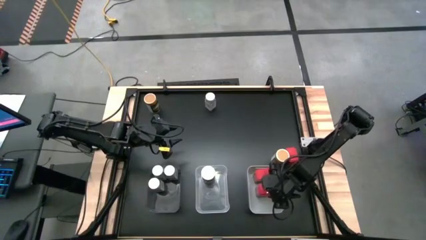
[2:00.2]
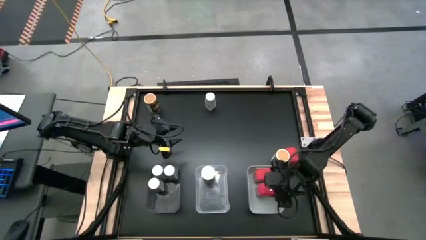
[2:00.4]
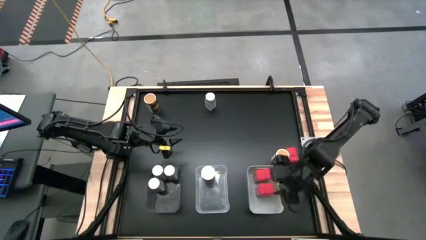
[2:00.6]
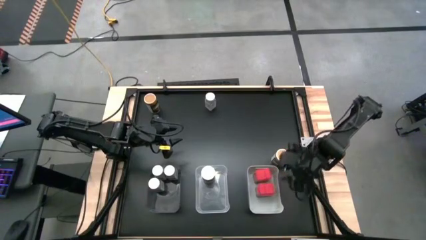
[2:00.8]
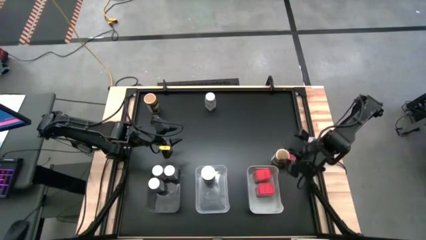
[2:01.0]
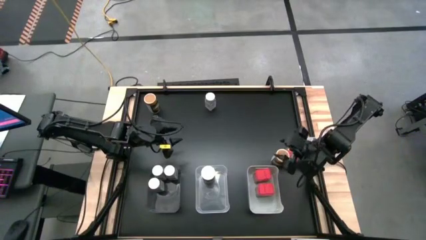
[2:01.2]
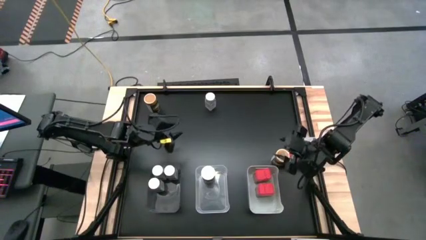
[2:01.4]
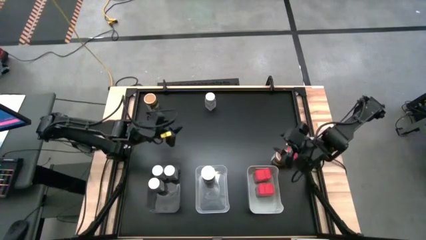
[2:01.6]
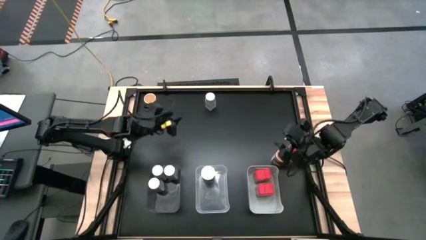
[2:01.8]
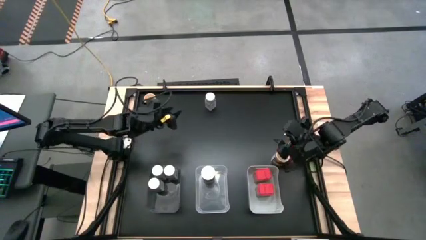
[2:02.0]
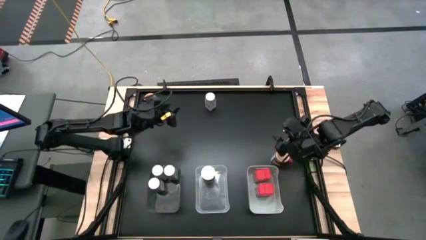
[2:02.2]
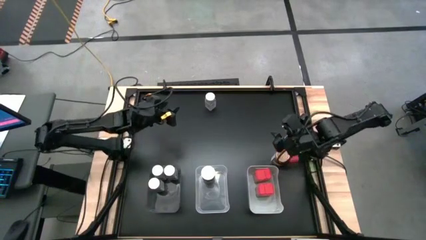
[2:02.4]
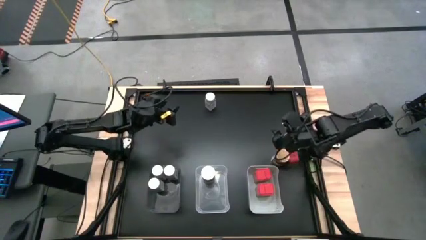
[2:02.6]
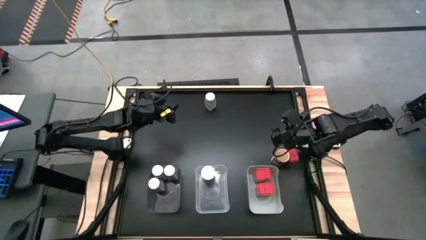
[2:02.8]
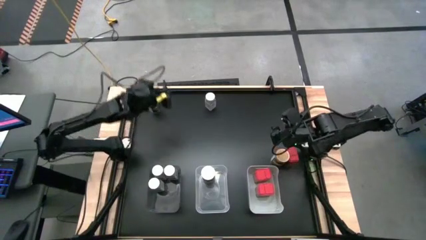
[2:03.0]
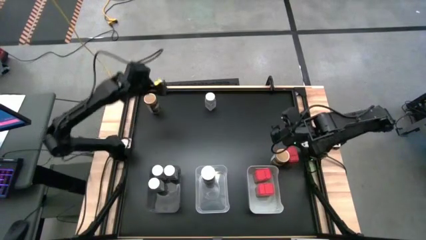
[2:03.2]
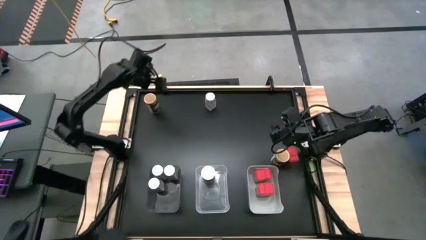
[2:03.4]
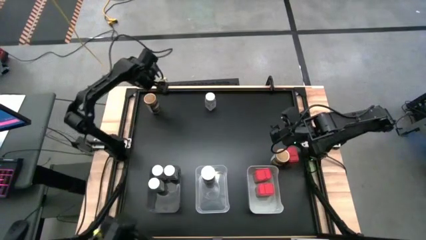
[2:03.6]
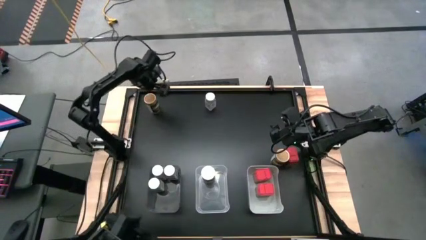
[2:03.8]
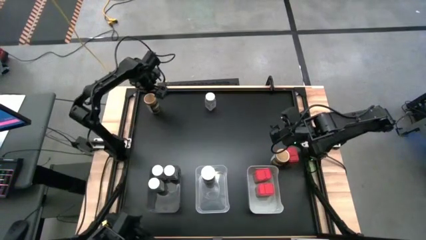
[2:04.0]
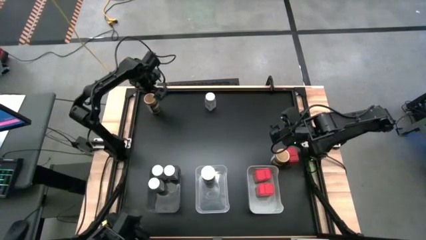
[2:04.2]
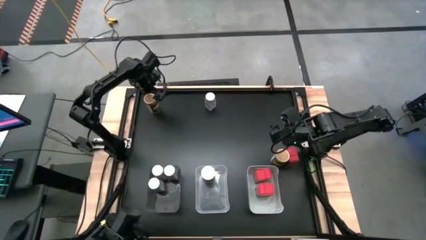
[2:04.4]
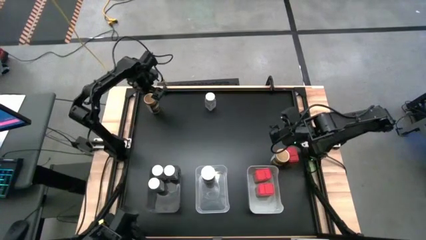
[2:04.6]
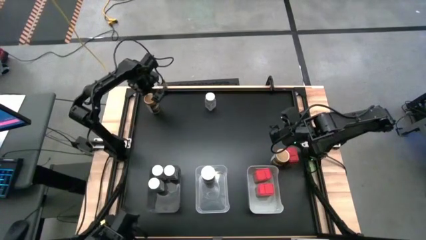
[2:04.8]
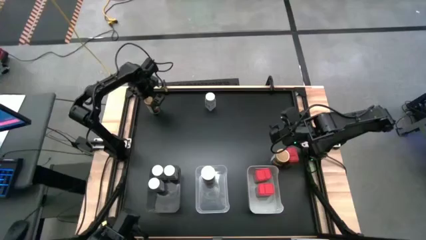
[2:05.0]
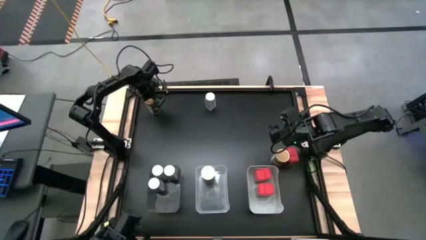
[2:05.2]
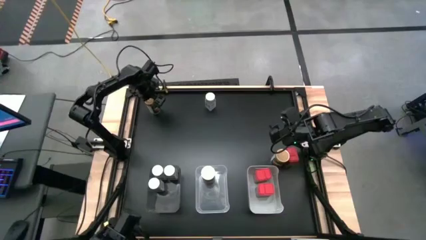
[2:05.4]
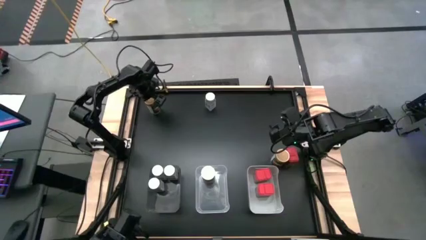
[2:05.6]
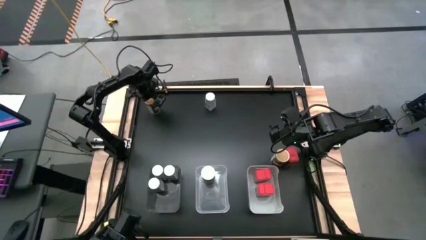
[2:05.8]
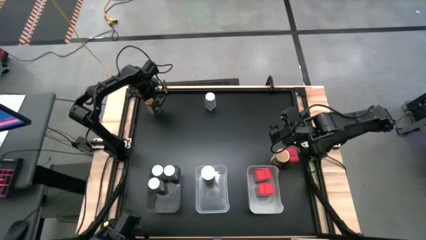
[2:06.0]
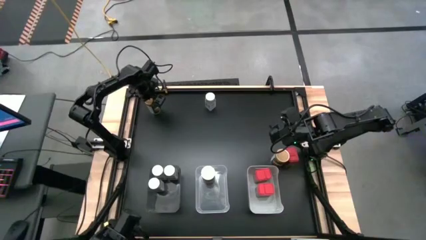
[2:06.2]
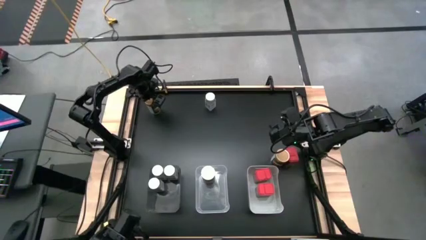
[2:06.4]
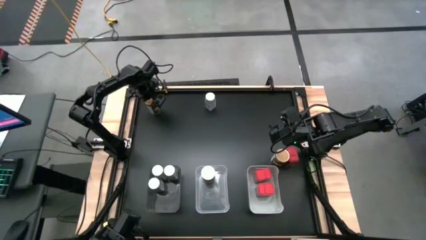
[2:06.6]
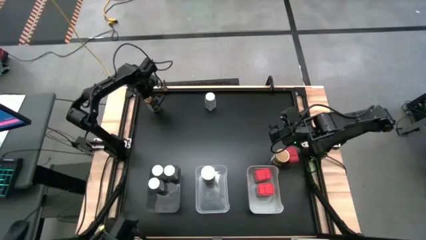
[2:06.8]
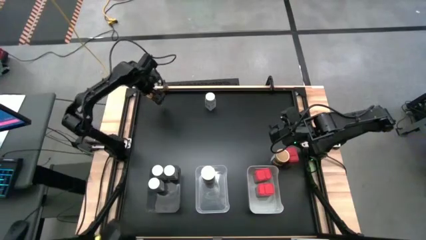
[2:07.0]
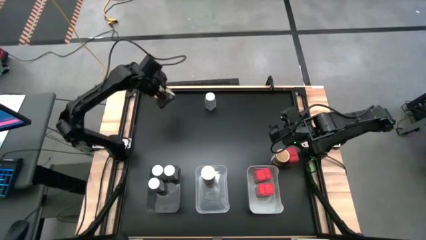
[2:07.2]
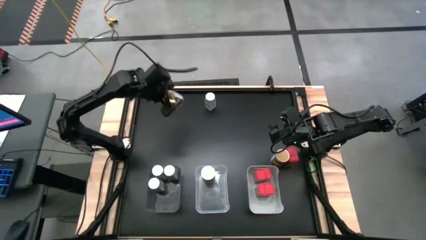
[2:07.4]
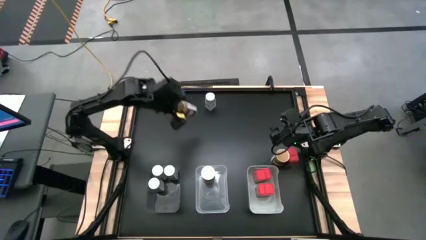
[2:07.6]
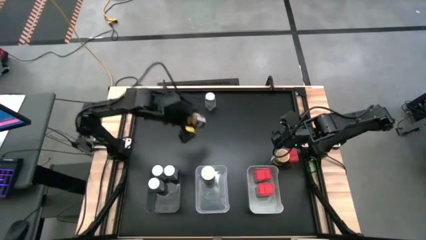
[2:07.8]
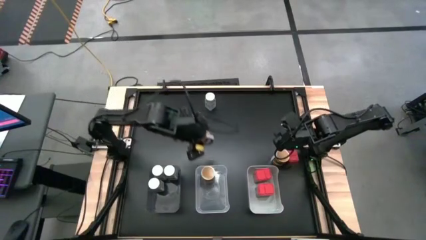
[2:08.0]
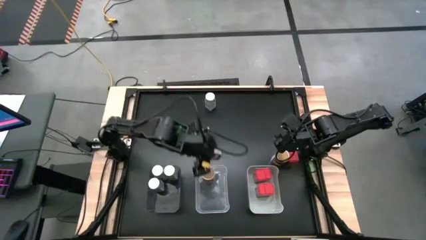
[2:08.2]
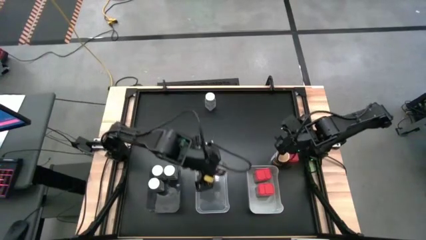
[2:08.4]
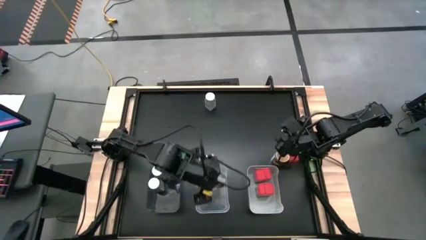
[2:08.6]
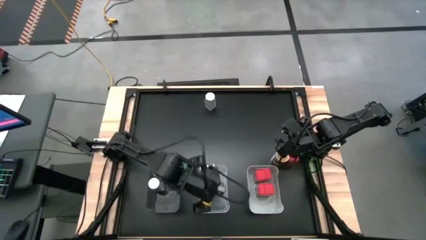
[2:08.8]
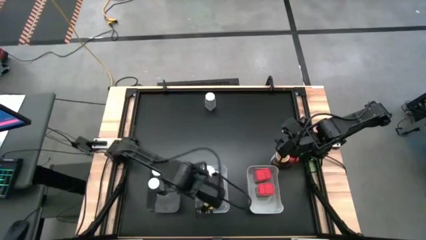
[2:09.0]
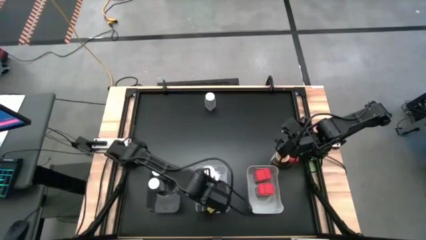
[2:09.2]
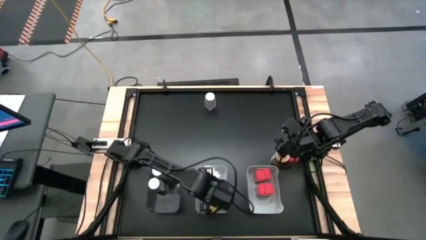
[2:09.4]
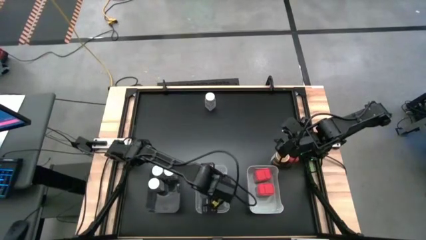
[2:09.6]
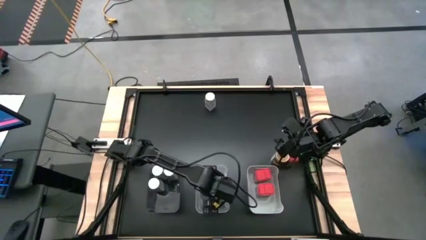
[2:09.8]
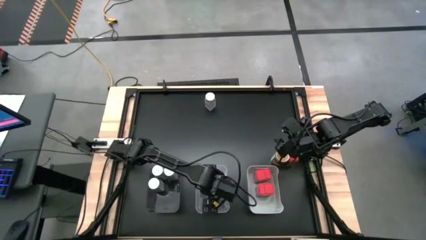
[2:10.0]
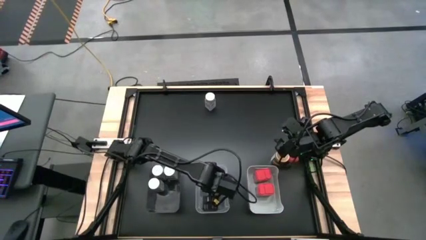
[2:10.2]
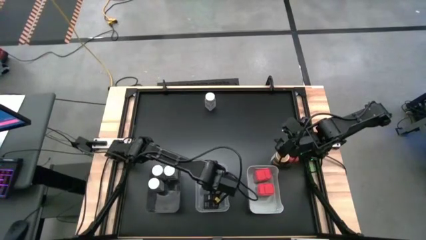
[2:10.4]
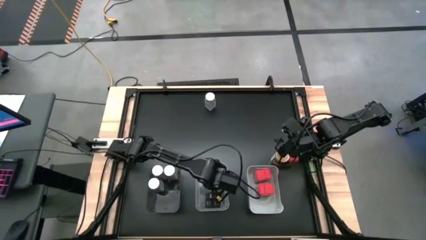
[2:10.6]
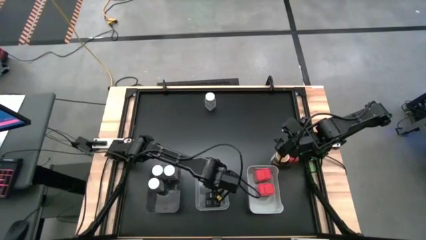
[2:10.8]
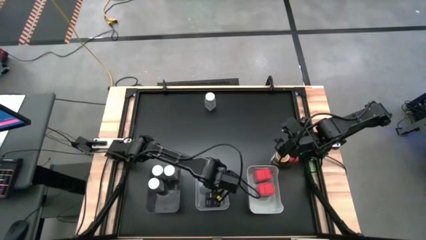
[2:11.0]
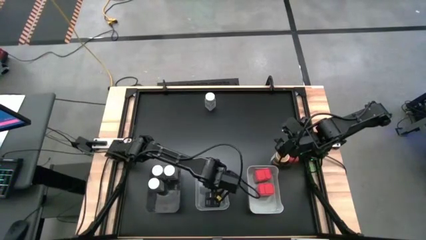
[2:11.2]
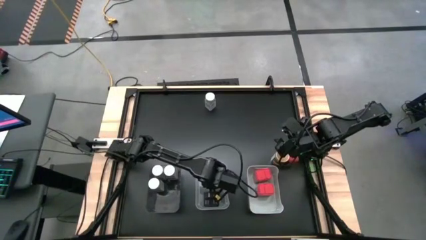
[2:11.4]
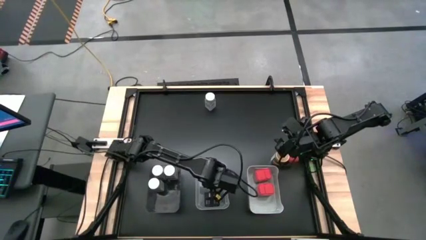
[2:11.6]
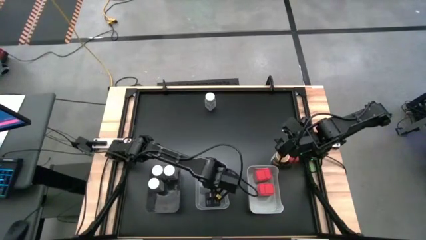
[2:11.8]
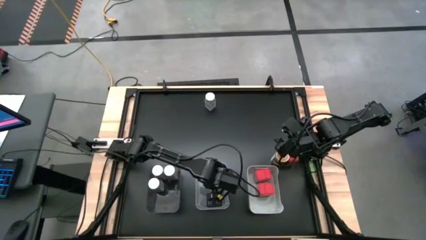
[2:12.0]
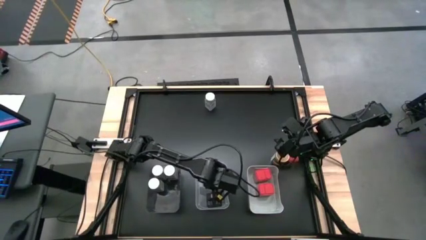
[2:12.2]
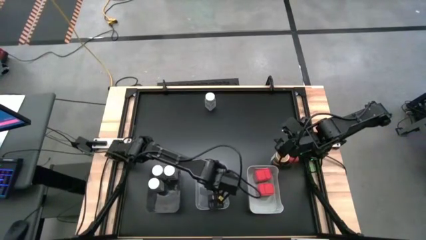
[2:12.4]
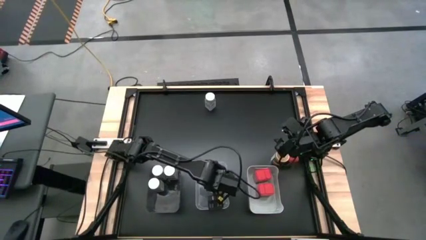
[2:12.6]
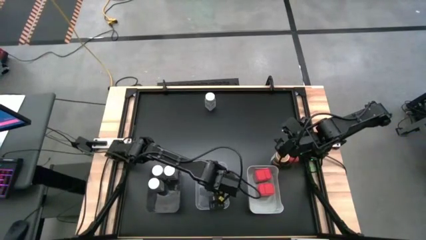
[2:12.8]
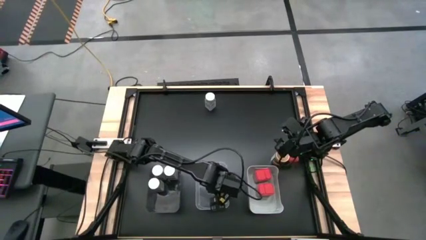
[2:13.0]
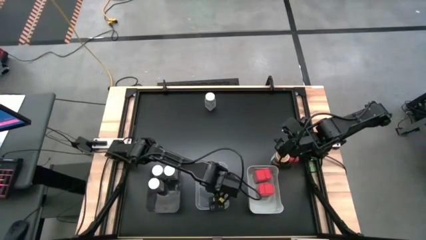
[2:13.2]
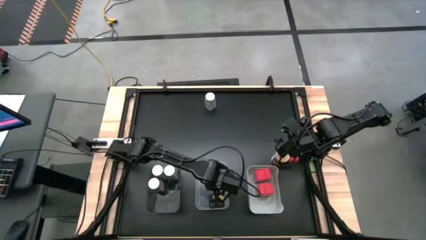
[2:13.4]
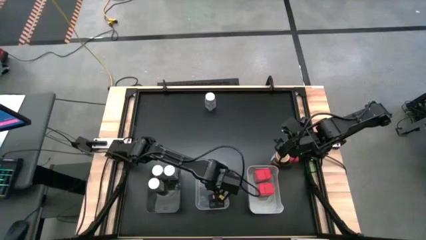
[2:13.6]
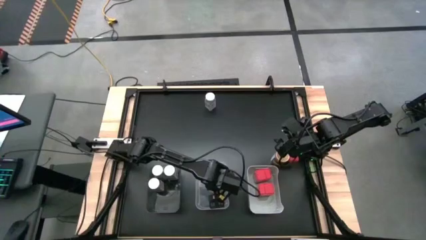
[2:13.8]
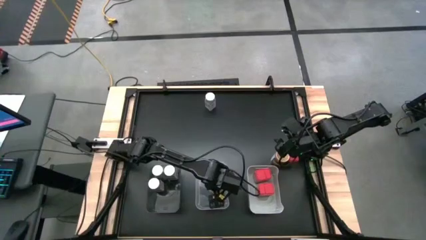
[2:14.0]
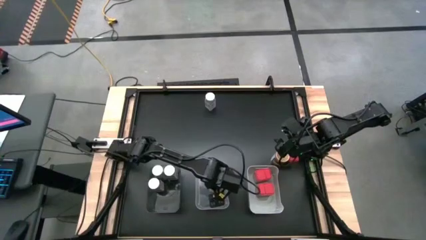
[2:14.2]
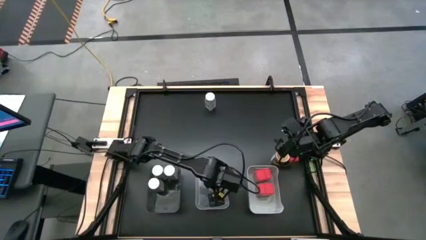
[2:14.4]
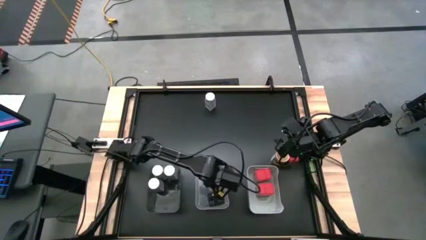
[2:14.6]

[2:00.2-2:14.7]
Task: Sort spices by type
Put the top golden seasoning bottle into the transparent bin

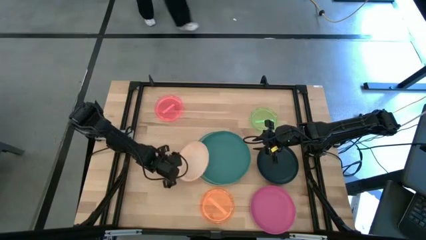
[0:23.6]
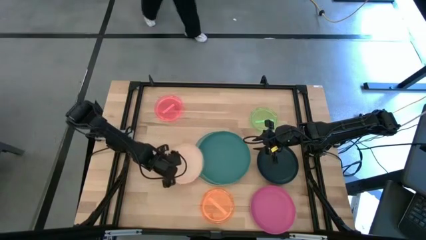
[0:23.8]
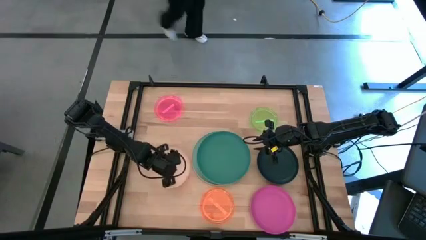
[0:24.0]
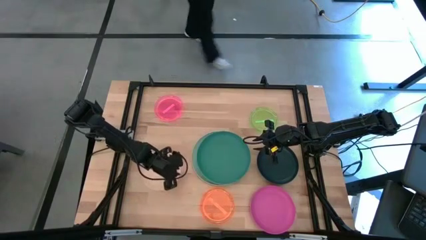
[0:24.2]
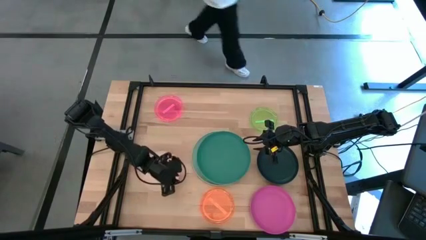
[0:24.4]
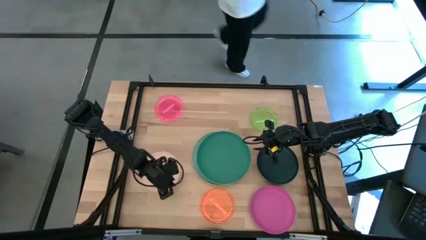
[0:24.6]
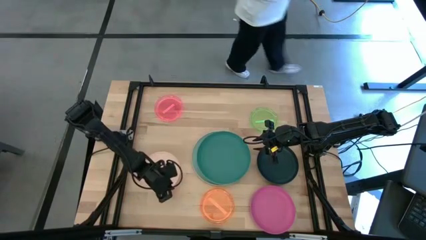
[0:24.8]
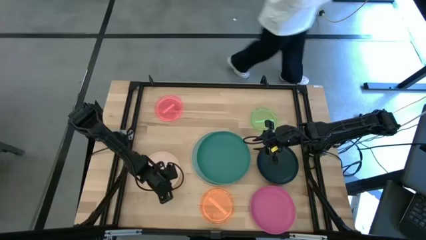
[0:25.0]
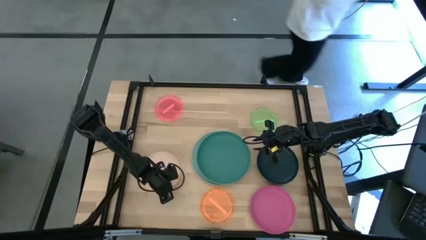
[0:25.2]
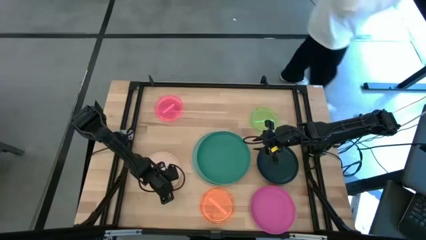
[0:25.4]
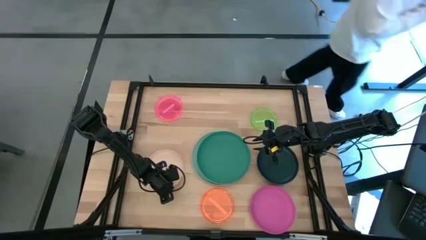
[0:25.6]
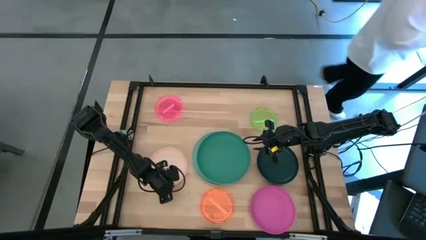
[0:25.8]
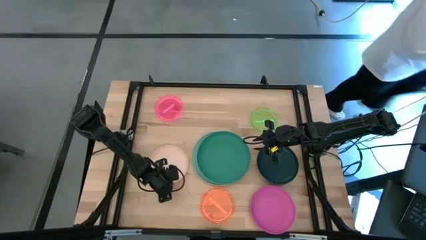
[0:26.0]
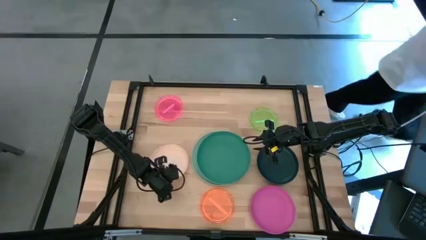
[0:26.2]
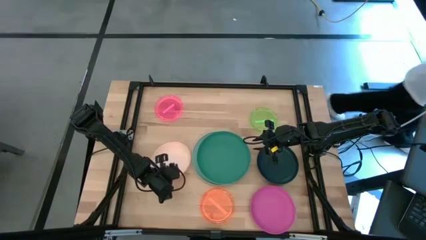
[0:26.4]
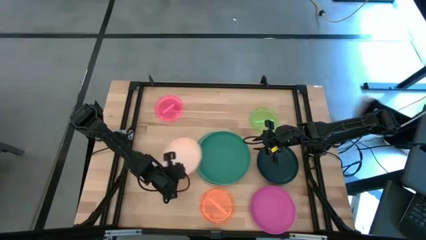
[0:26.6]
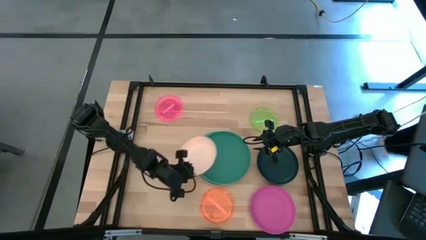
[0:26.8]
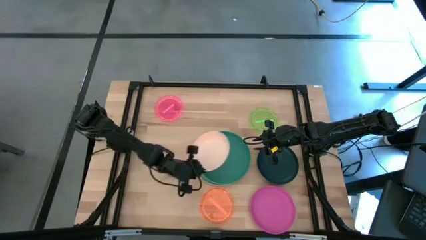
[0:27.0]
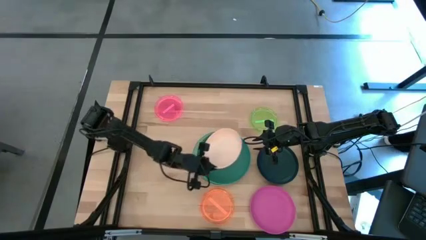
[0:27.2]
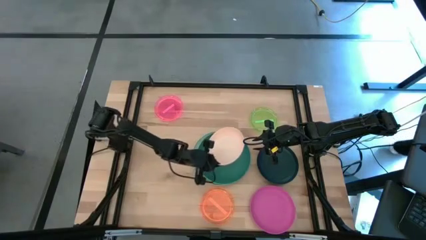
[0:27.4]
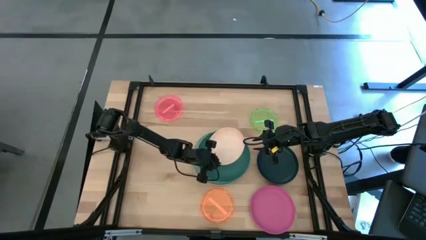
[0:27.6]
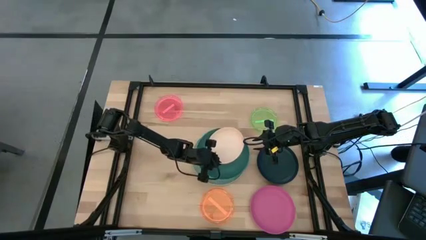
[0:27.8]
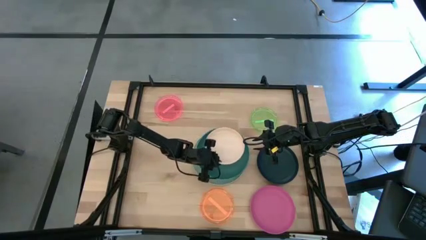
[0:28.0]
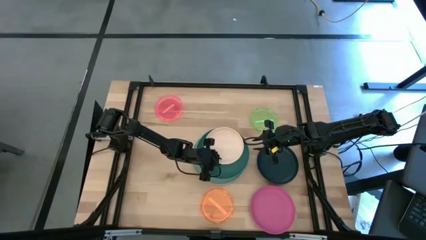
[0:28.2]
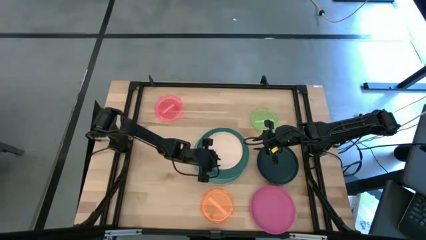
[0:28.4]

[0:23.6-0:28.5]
Task: Stack plastic plates
Stack the white plate on top of the dark green plate
